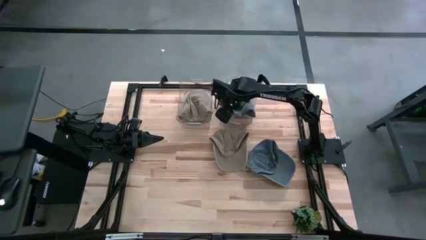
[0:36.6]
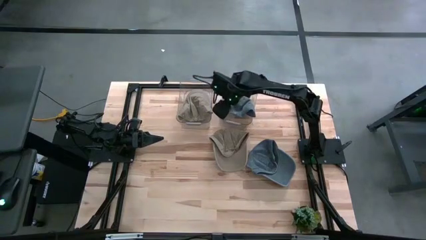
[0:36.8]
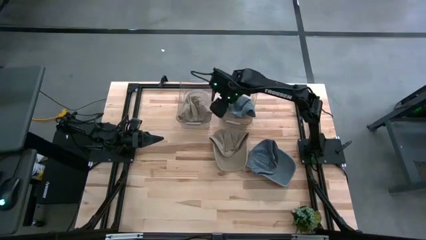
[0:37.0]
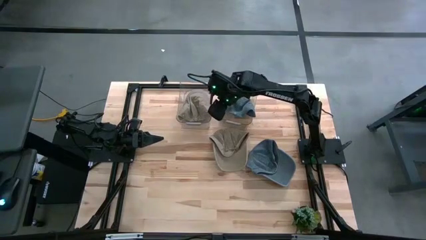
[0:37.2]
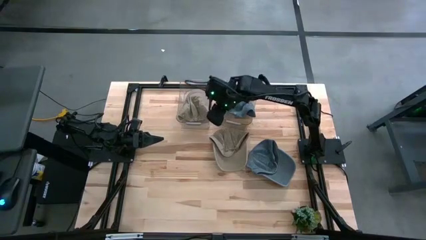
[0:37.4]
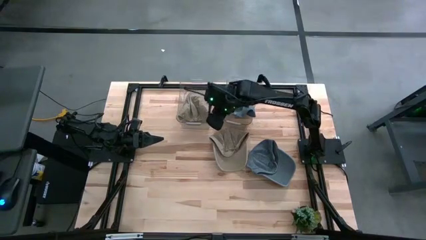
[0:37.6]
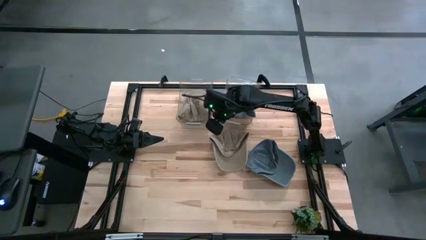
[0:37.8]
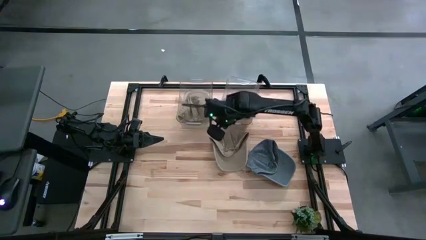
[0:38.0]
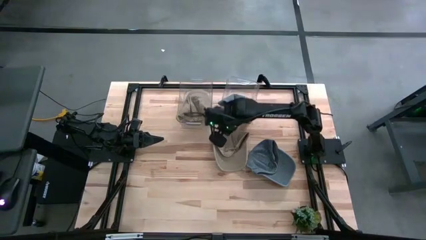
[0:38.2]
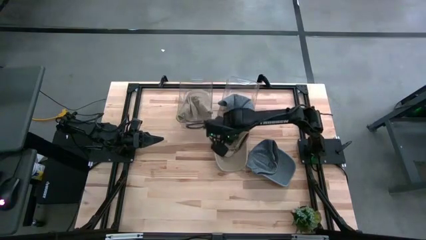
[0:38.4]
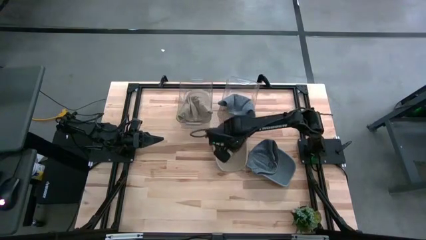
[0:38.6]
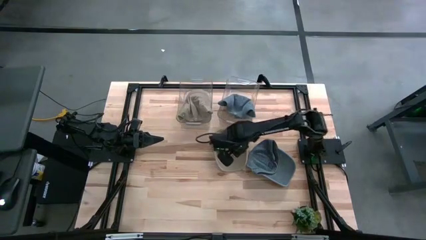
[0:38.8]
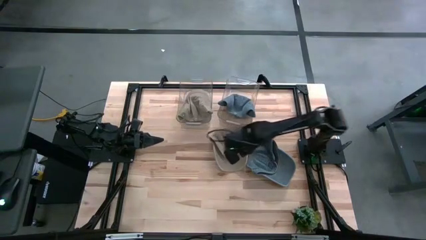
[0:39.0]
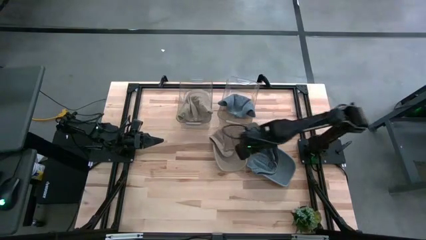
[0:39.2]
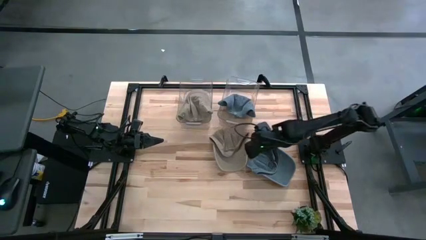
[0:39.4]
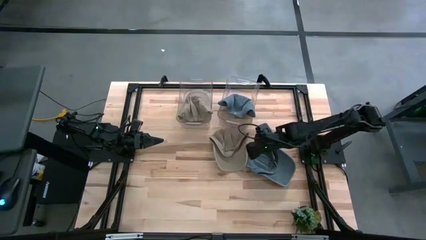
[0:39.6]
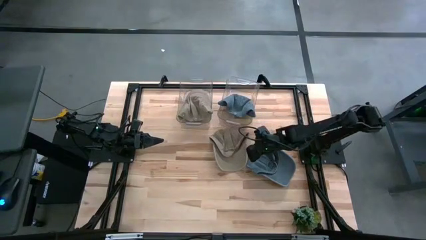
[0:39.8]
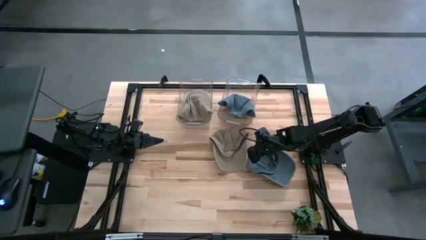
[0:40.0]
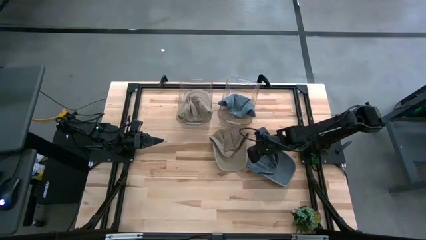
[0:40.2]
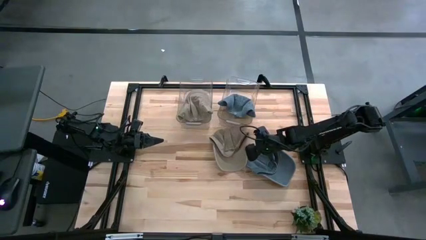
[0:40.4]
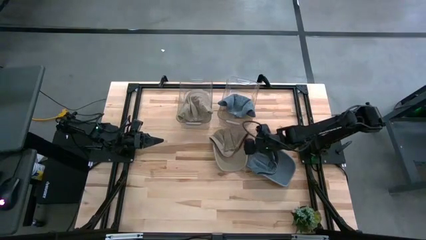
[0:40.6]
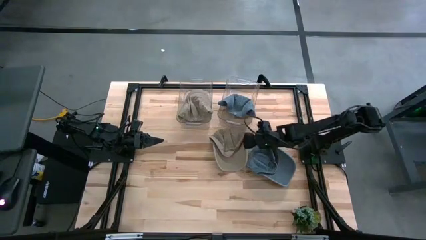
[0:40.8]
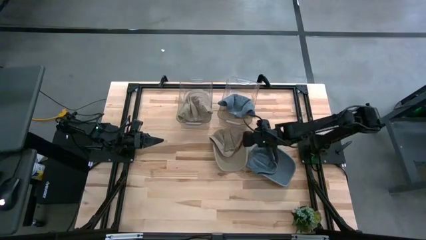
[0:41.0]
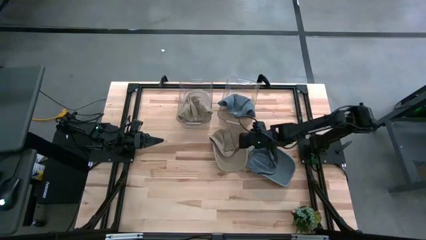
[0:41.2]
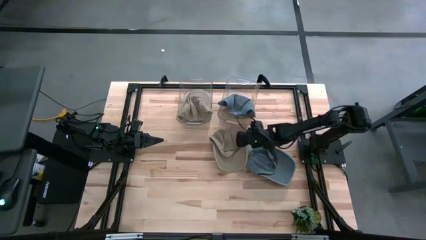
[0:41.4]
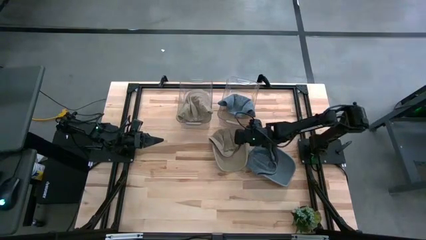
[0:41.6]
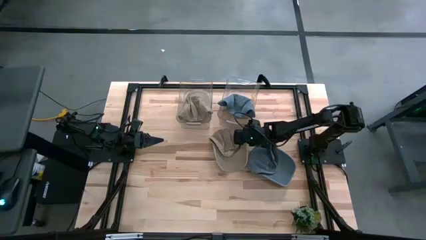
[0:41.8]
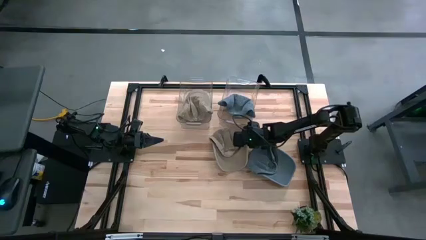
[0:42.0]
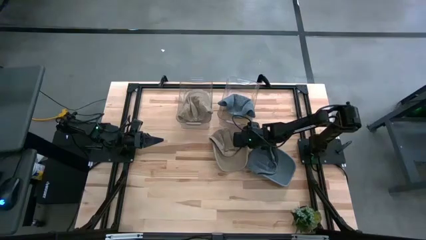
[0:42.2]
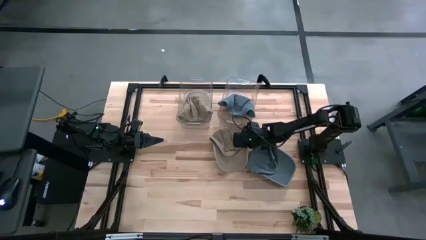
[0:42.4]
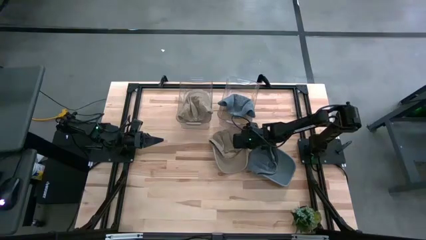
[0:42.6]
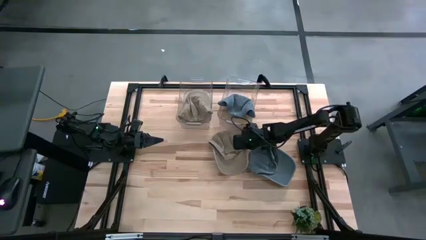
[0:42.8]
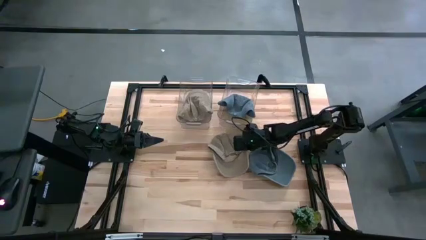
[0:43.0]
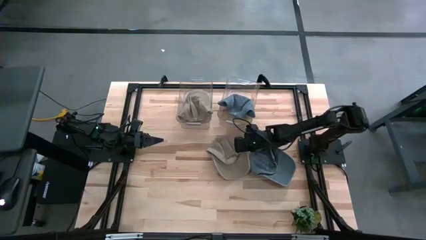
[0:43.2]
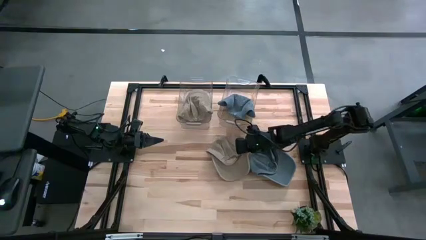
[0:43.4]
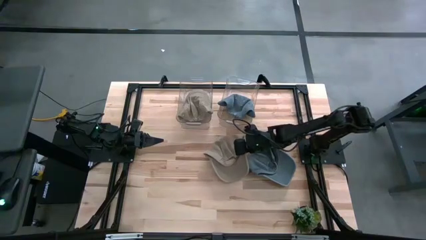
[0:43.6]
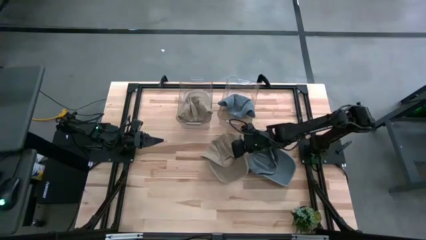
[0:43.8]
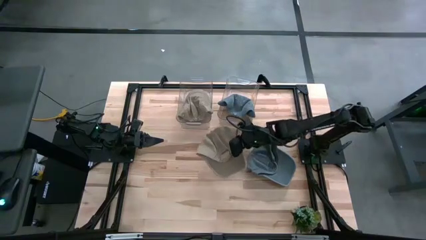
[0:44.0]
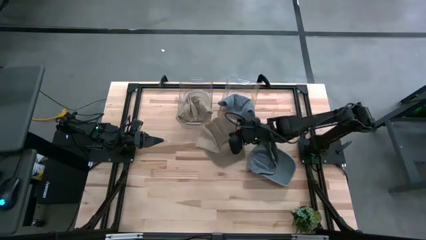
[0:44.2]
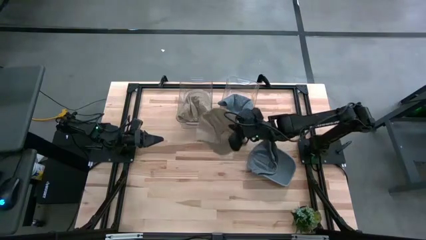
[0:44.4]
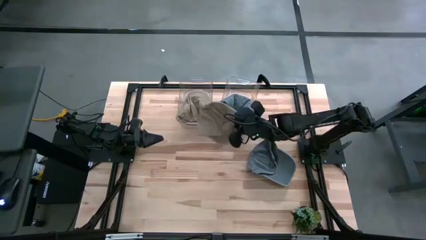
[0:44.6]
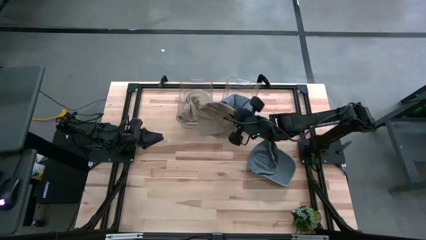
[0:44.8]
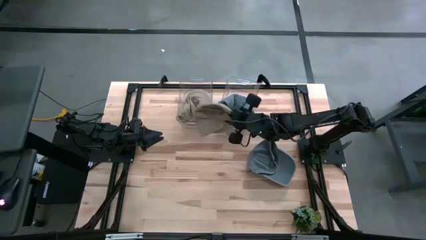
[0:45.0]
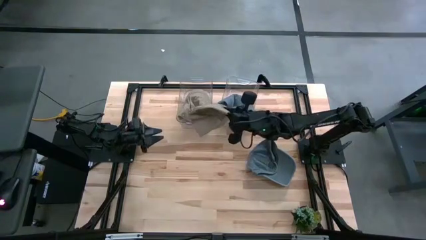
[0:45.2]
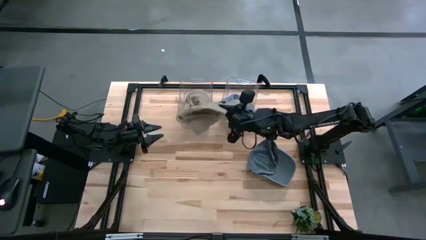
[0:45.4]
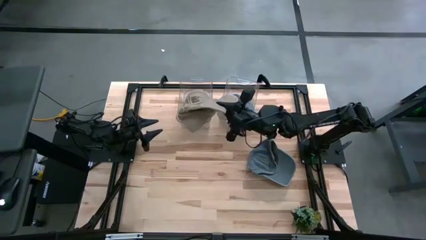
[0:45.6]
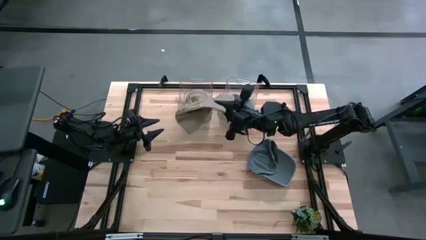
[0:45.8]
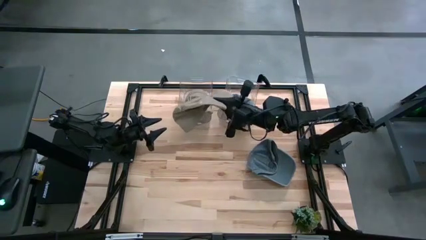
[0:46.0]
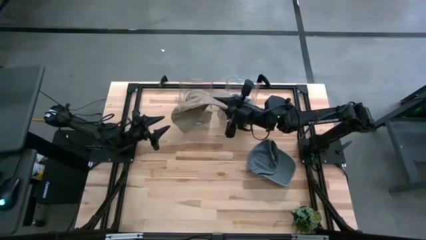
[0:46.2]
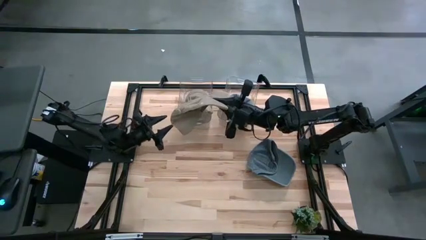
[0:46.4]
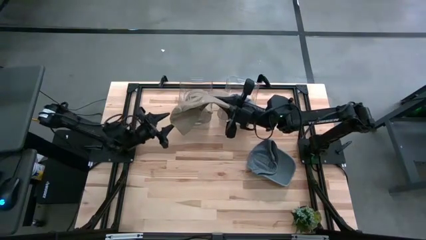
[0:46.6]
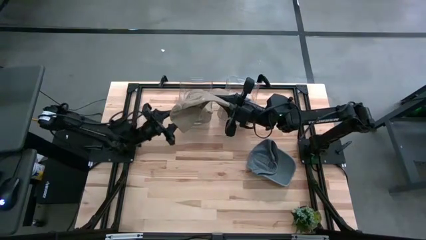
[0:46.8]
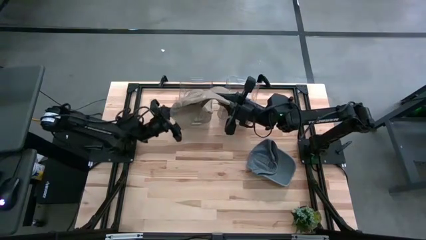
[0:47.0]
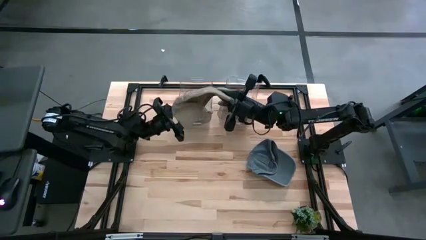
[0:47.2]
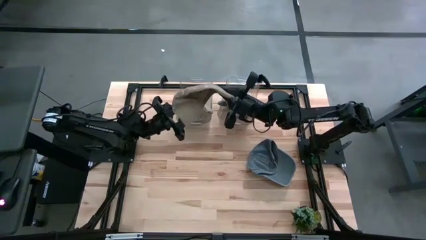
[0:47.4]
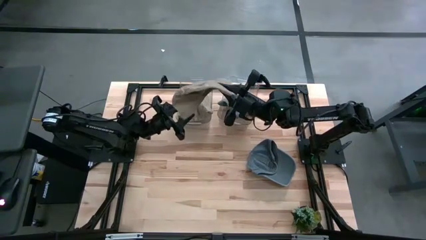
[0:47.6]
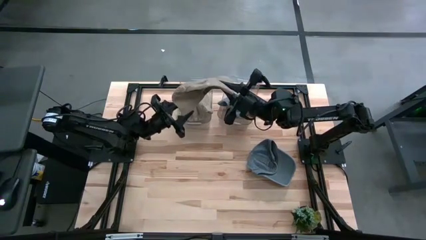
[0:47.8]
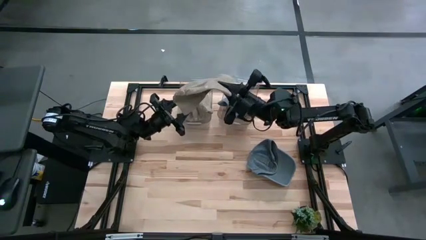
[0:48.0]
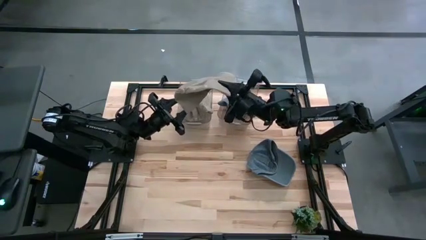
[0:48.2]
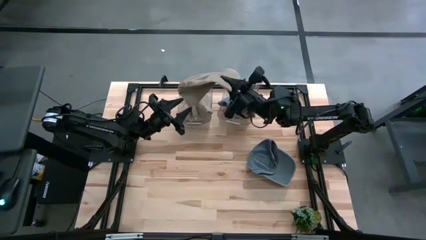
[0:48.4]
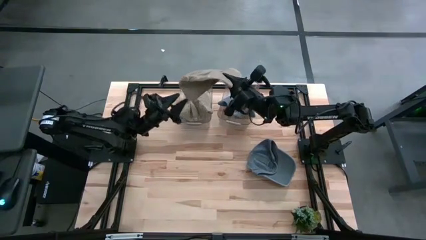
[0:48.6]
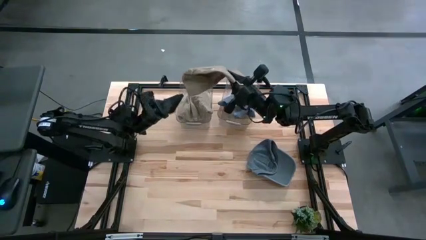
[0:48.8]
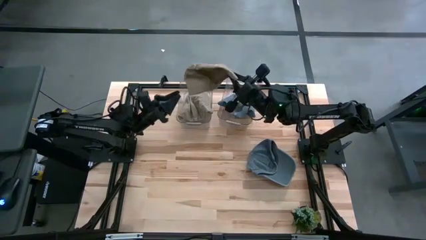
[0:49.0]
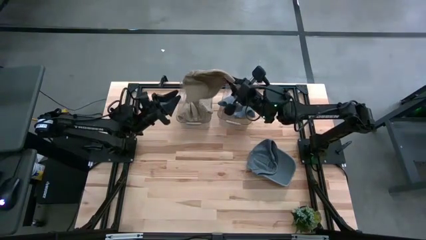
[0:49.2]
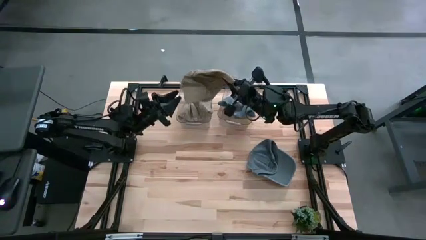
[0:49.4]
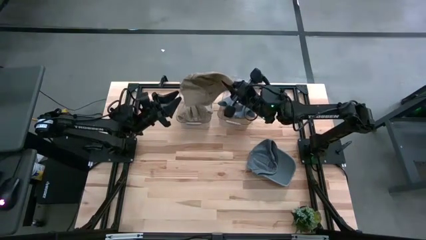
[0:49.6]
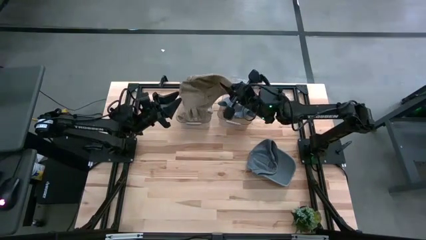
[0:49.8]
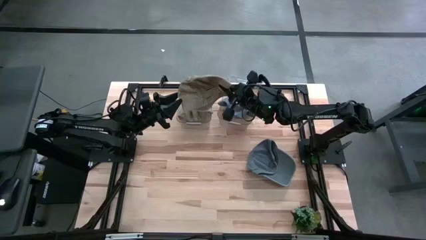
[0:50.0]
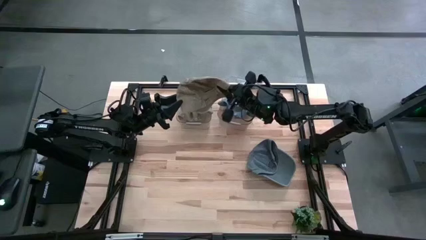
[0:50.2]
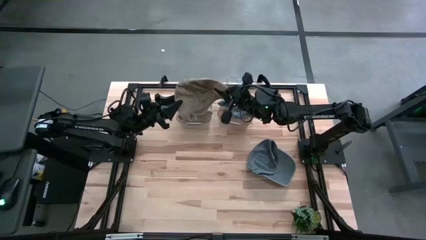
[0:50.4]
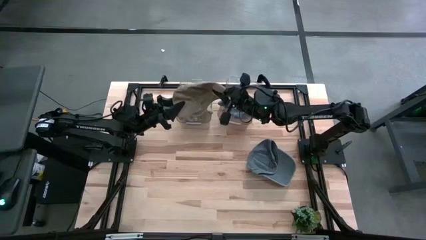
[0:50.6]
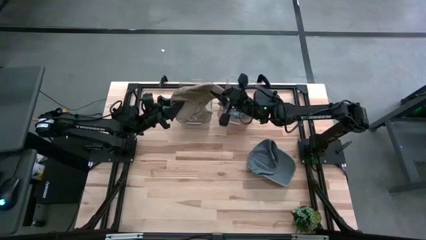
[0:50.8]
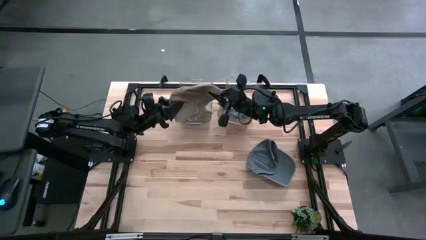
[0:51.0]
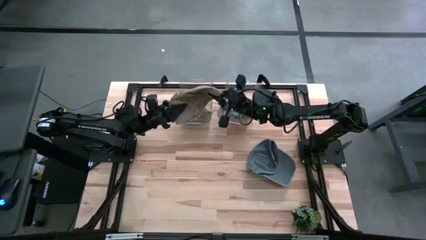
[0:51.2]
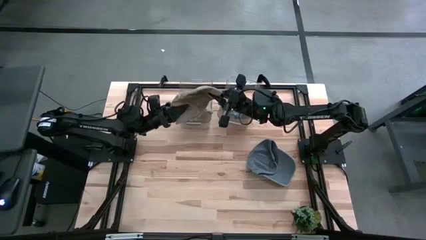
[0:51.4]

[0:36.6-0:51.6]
Task: Pick & Place hat
Put the brown cap into the left transparent bin
